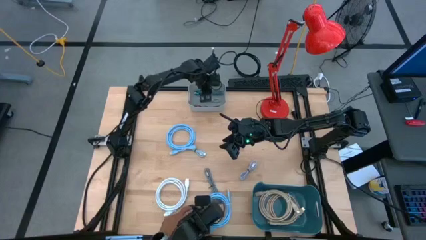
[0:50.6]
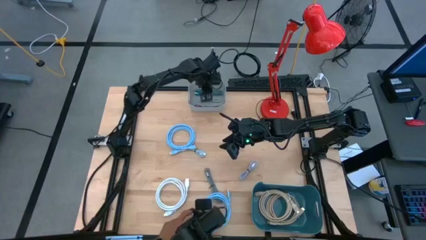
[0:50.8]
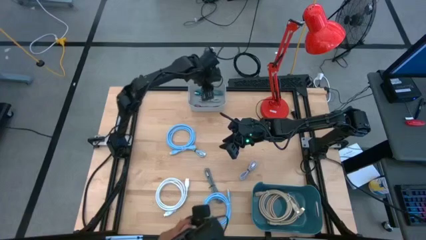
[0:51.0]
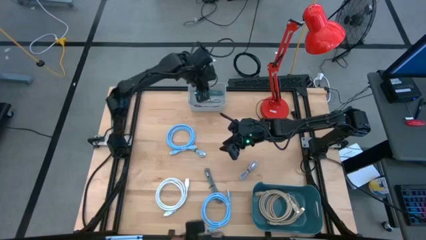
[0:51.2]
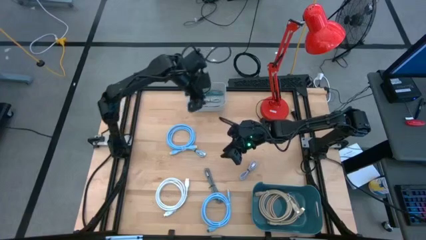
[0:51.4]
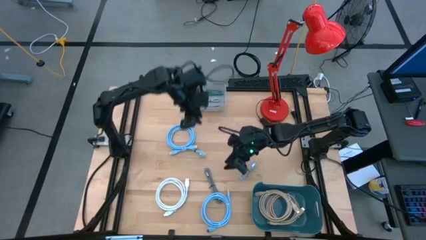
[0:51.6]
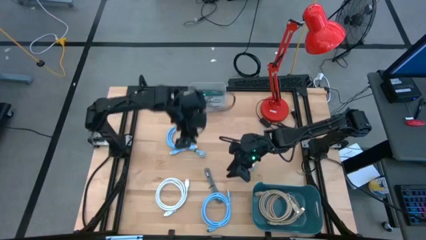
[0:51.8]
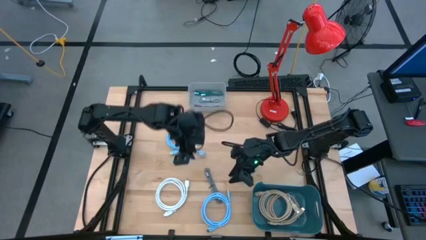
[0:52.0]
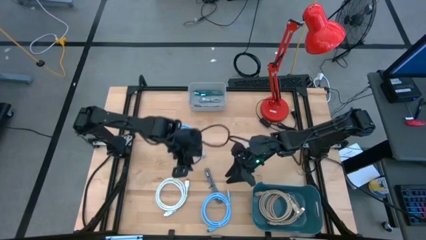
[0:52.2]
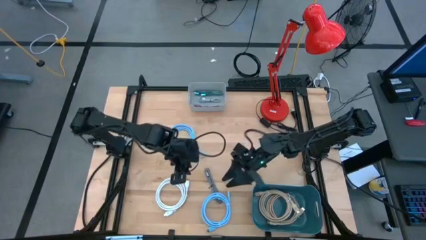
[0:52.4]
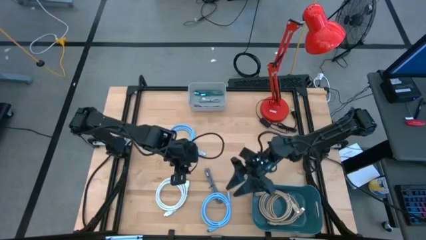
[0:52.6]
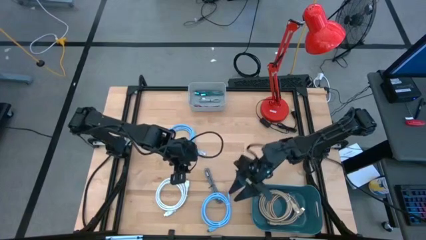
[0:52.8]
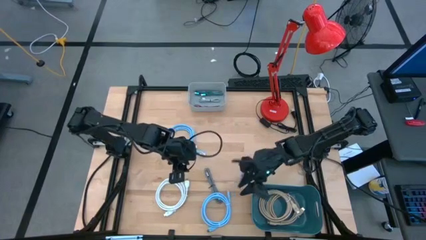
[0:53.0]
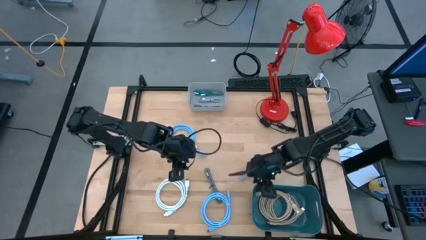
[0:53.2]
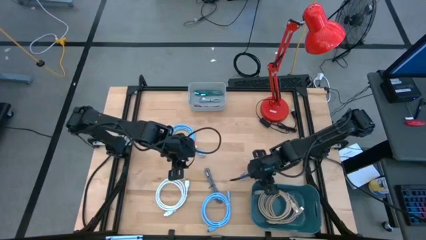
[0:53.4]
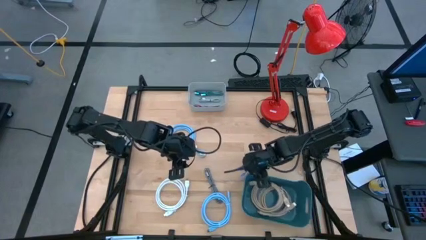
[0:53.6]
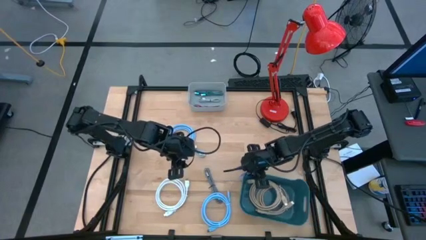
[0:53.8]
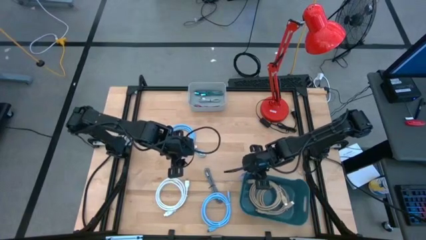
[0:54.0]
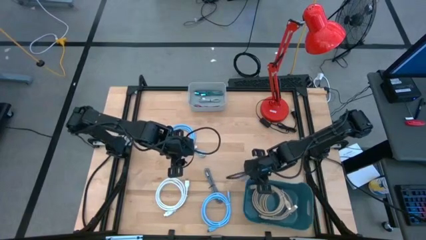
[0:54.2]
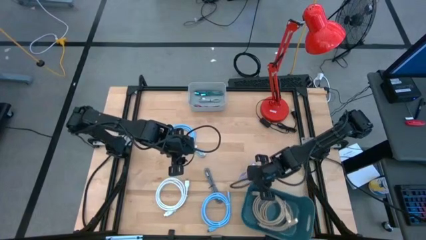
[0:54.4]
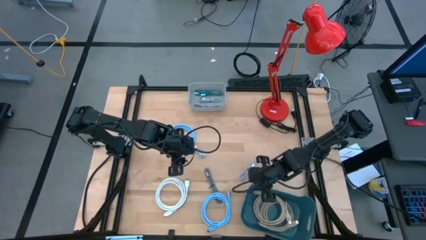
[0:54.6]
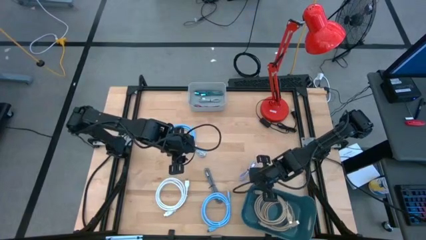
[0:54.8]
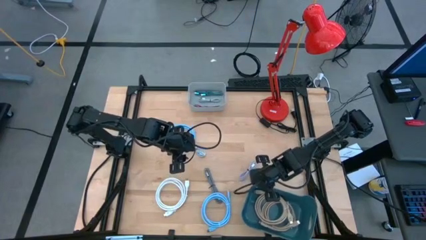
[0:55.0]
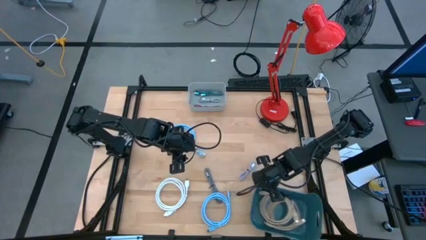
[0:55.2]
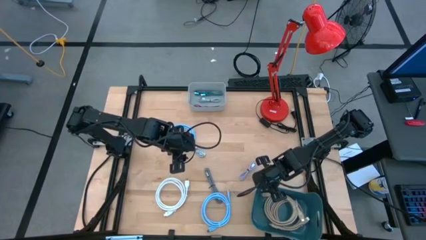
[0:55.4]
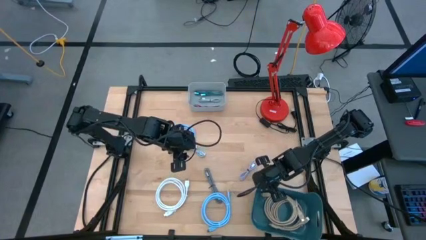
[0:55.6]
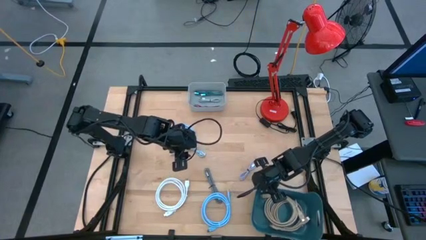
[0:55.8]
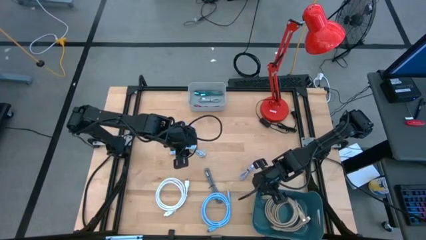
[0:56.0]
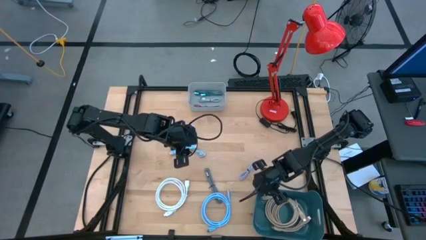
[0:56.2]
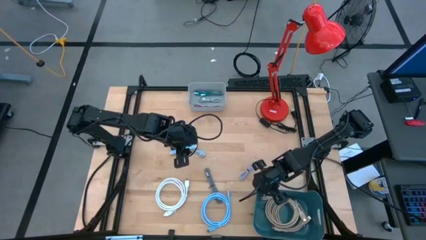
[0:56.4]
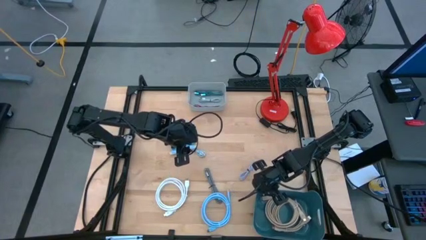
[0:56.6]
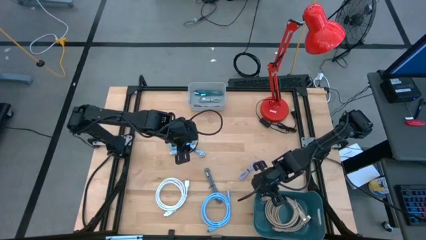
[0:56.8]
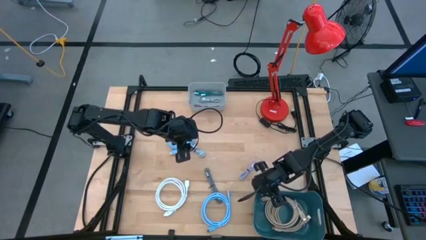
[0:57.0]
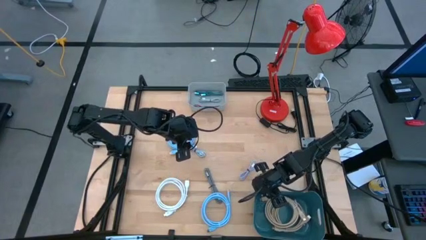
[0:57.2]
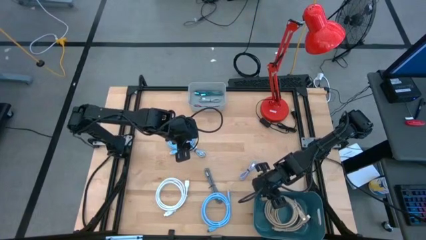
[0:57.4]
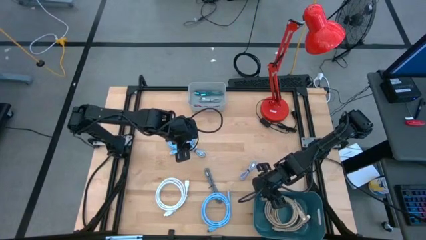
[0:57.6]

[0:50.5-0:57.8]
Task: Pick & Place USB Port
Adjust the blue bin

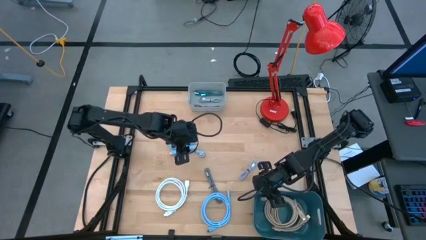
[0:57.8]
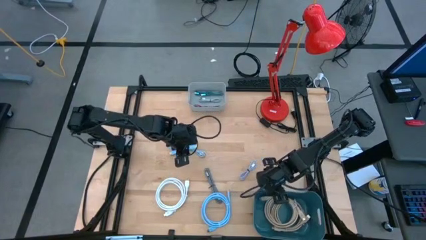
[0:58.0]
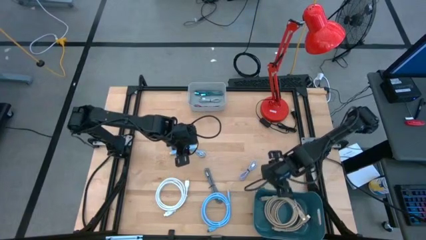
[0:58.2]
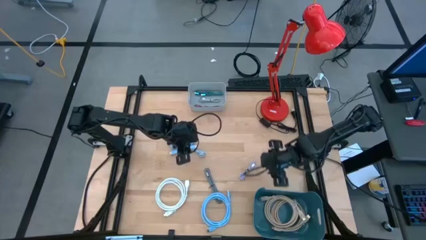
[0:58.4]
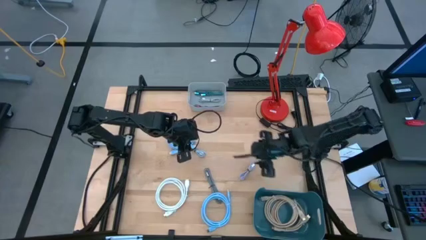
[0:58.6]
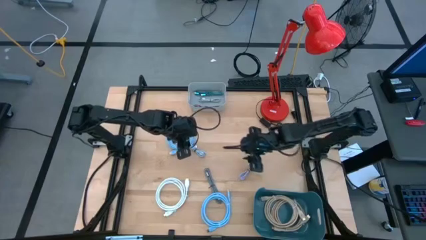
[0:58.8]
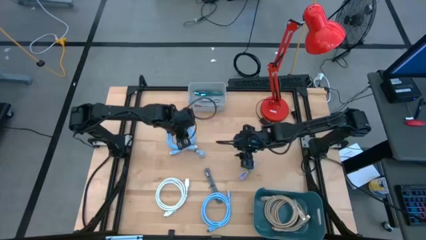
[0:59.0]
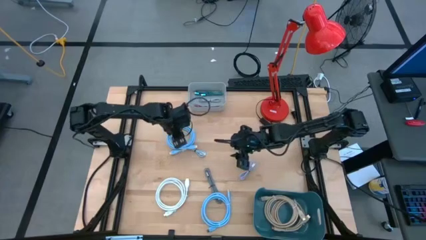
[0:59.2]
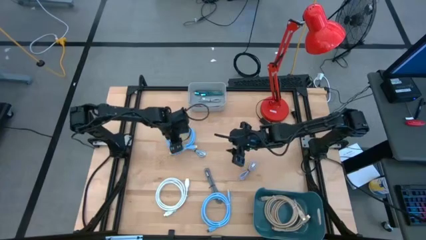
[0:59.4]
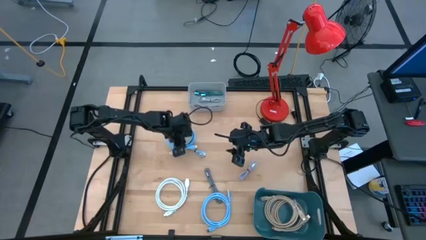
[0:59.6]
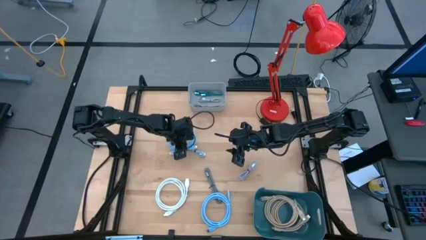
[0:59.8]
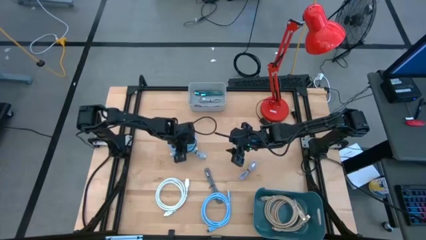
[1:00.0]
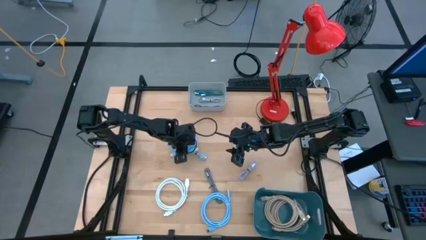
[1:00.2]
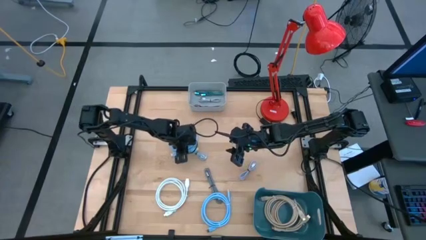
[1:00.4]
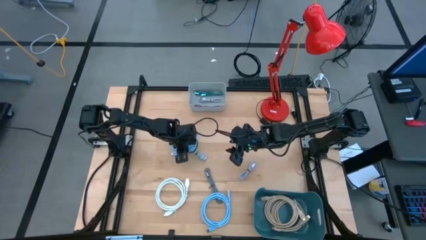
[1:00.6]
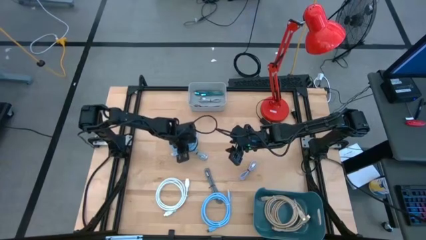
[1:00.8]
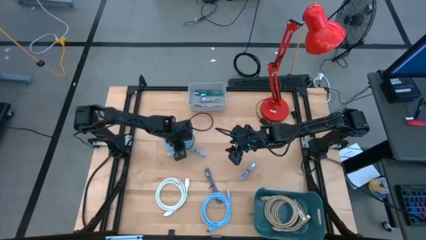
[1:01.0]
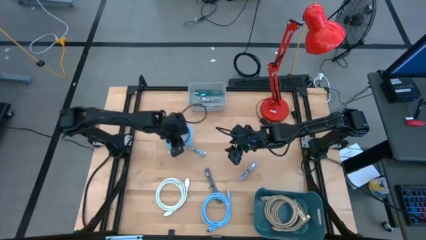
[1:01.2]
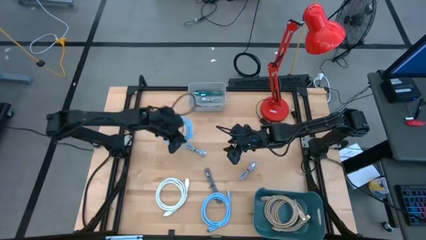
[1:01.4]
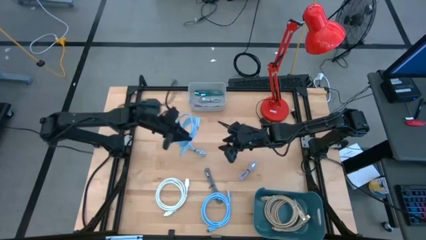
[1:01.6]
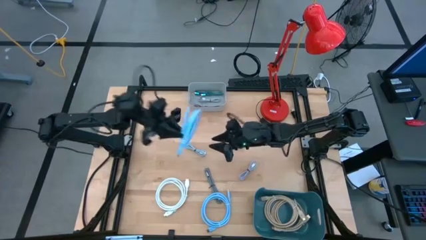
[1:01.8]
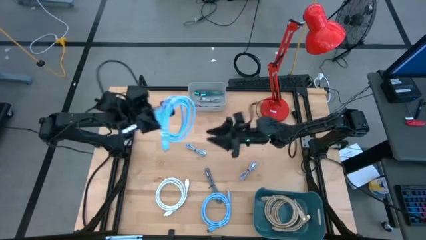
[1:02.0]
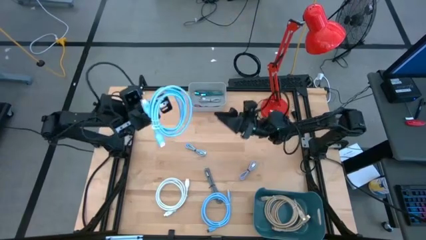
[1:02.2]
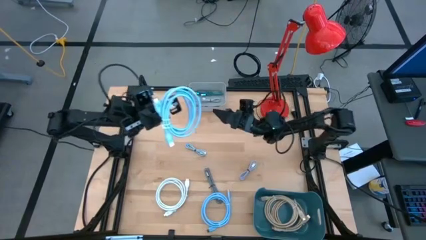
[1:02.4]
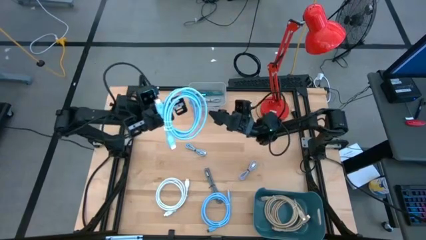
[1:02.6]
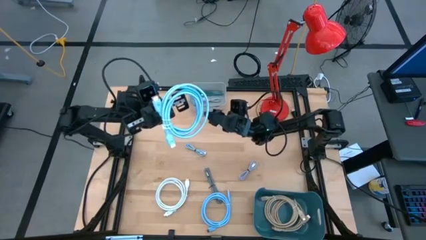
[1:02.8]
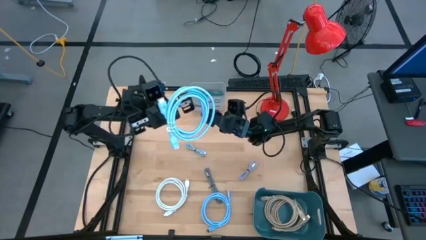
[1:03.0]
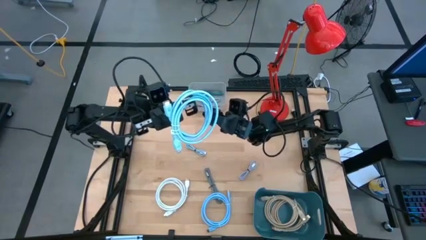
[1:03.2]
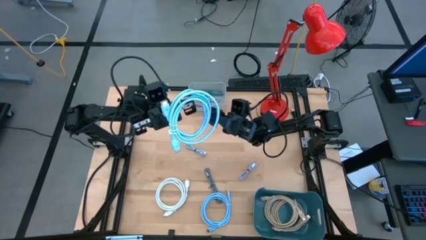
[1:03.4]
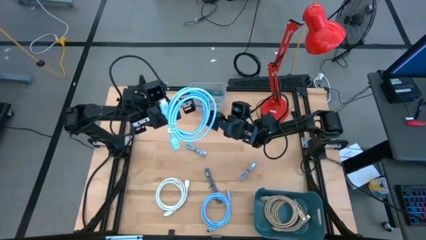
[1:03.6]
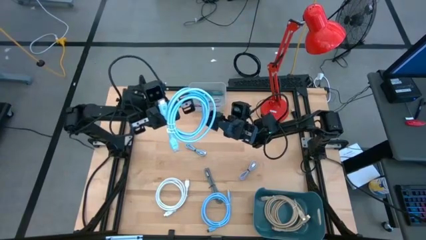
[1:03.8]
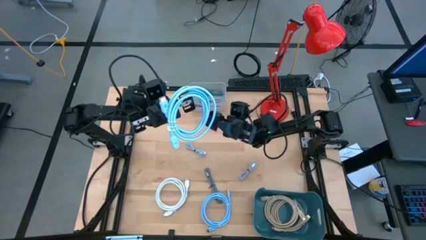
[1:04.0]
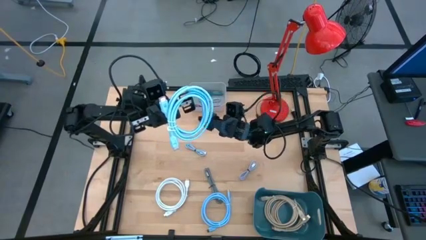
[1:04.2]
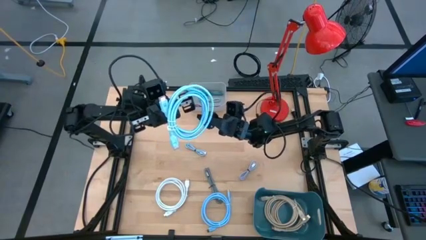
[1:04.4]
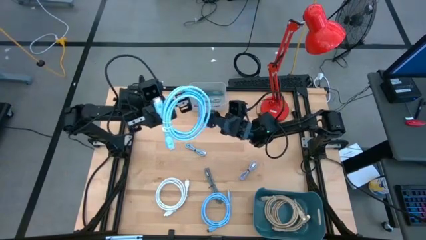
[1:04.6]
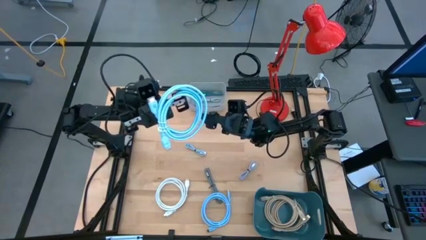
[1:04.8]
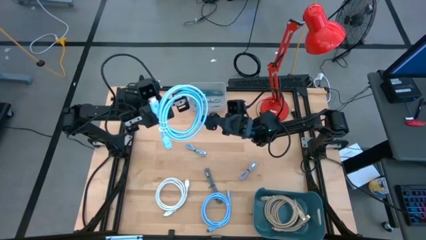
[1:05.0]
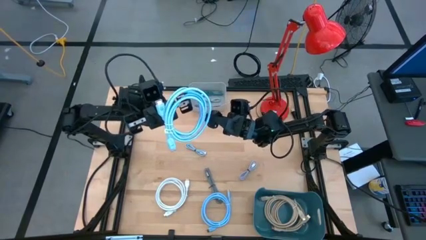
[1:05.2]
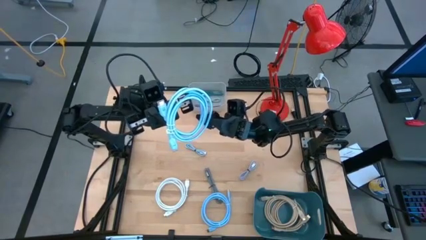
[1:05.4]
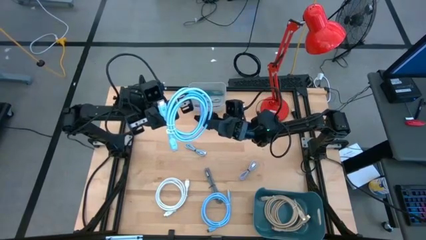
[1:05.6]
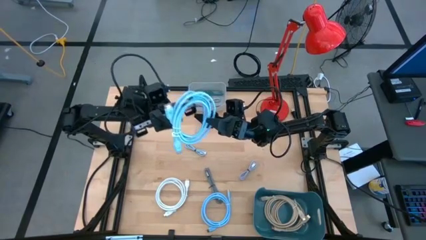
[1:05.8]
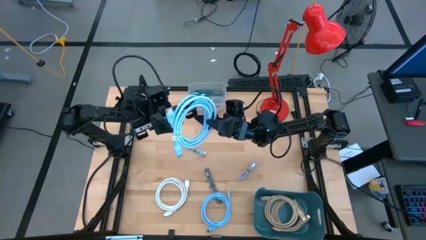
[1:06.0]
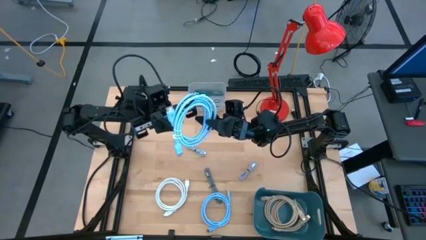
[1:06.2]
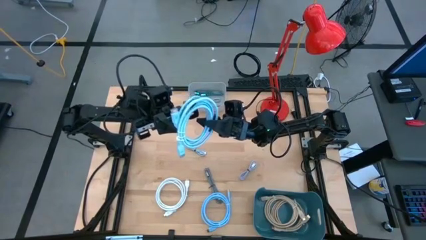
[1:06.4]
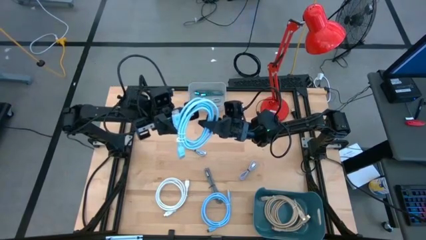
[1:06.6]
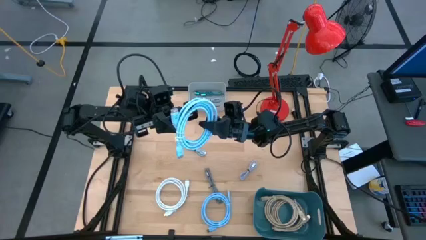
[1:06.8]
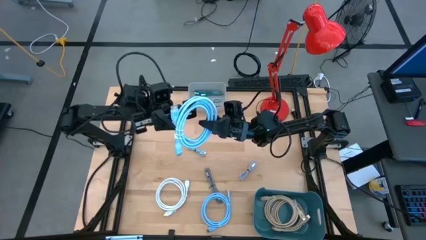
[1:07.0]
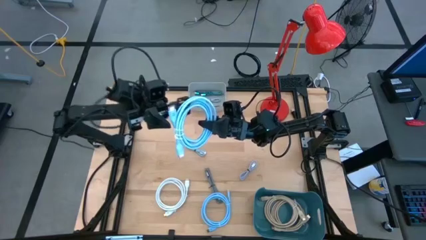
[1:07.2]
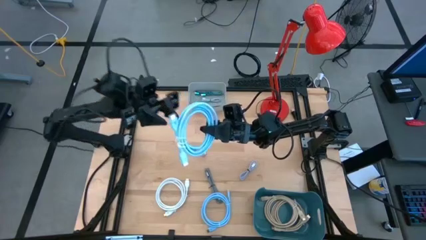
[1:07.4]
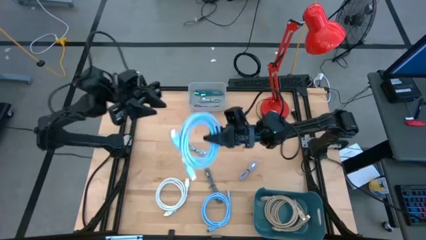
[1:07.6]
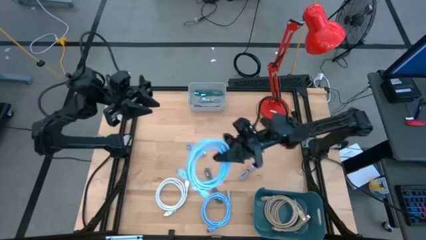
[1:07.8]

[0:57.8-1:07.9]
Put the blue hdmi cable into the blue bin
